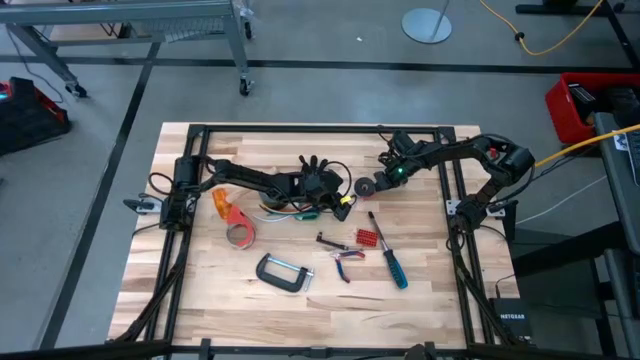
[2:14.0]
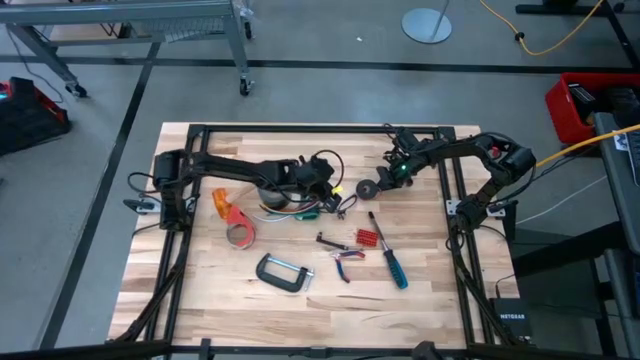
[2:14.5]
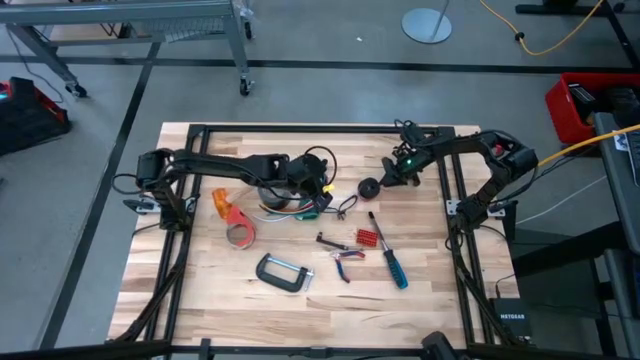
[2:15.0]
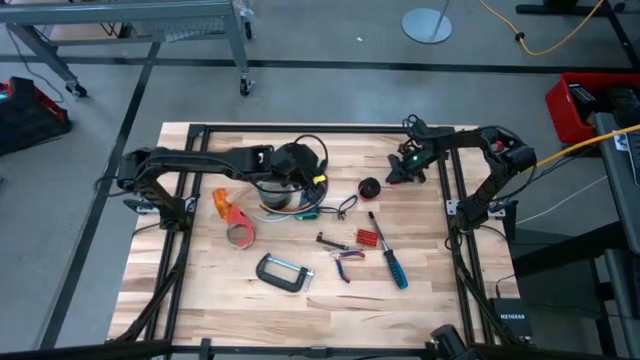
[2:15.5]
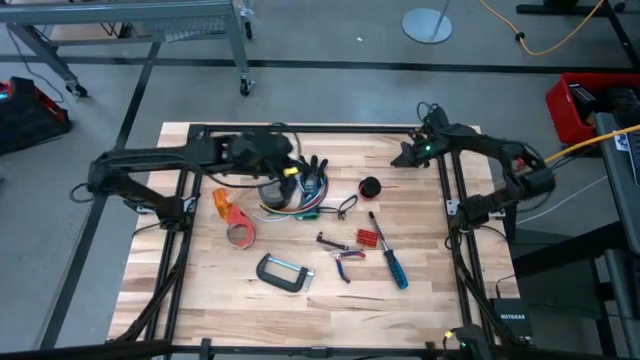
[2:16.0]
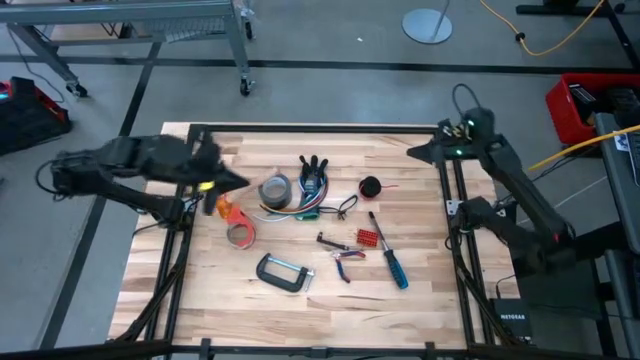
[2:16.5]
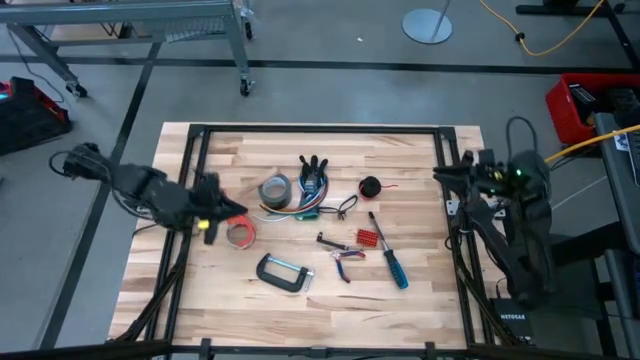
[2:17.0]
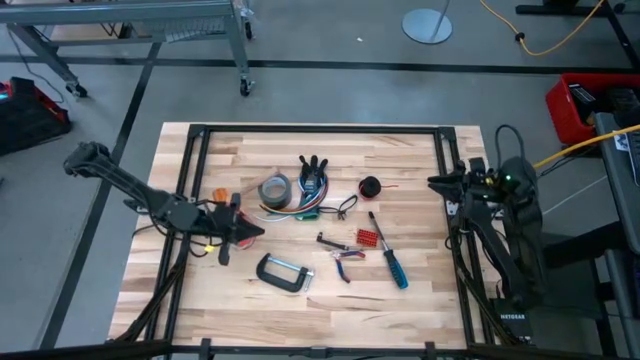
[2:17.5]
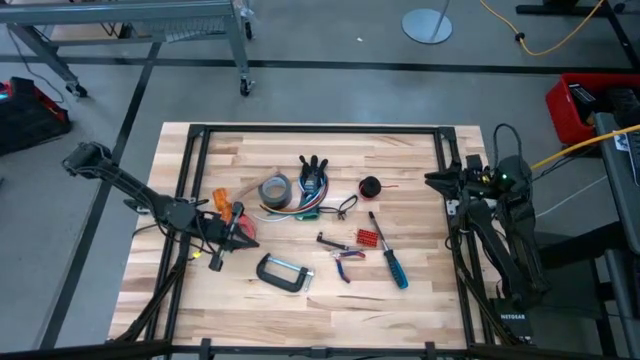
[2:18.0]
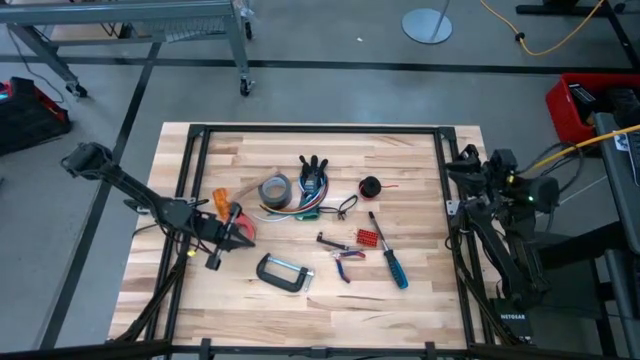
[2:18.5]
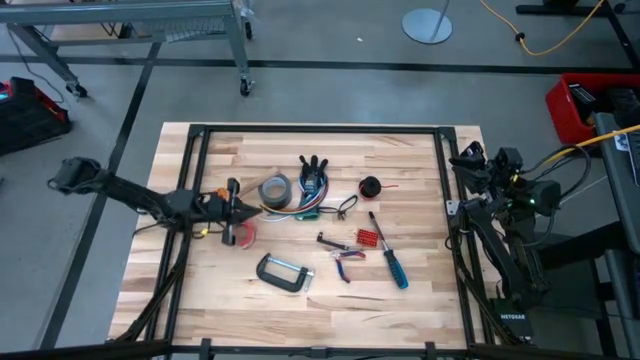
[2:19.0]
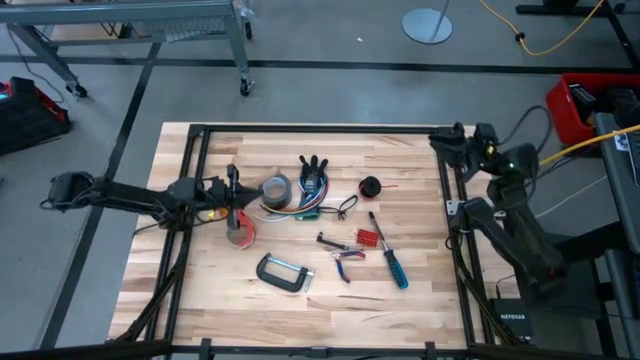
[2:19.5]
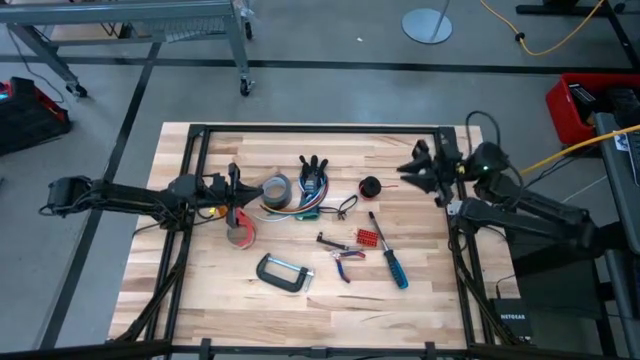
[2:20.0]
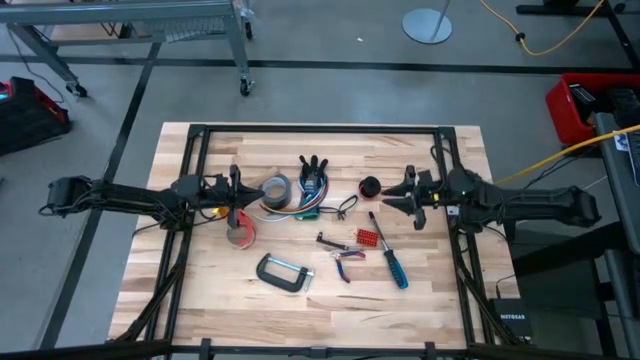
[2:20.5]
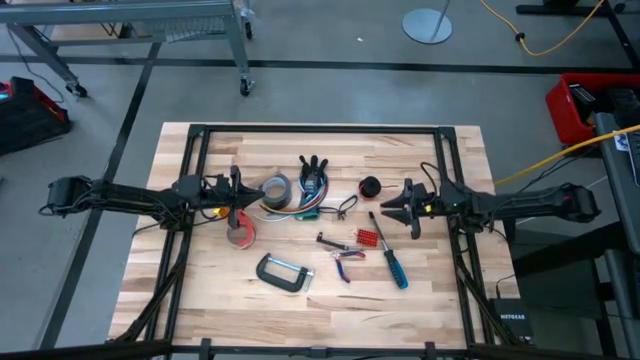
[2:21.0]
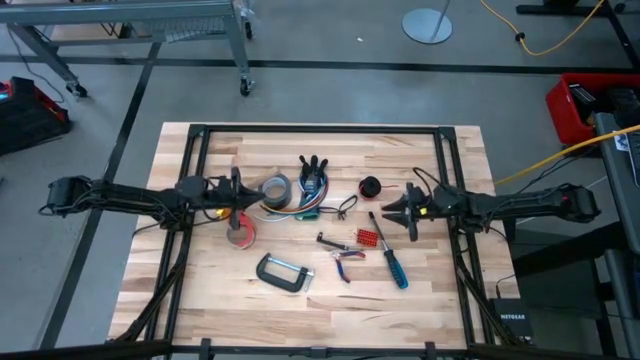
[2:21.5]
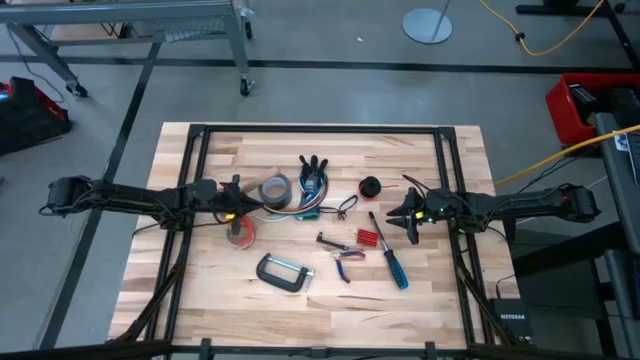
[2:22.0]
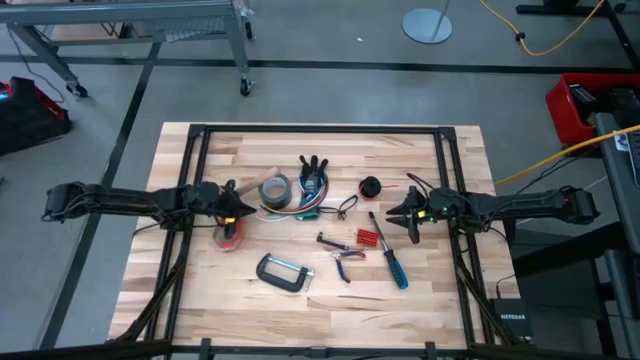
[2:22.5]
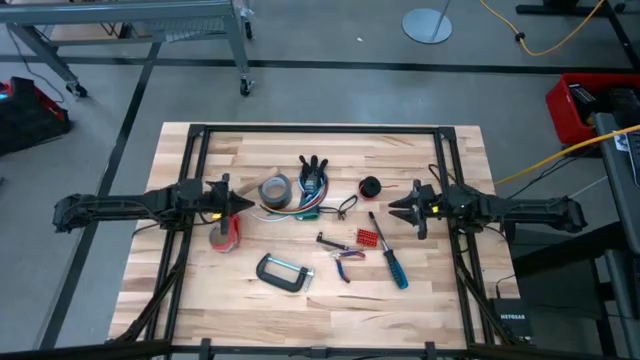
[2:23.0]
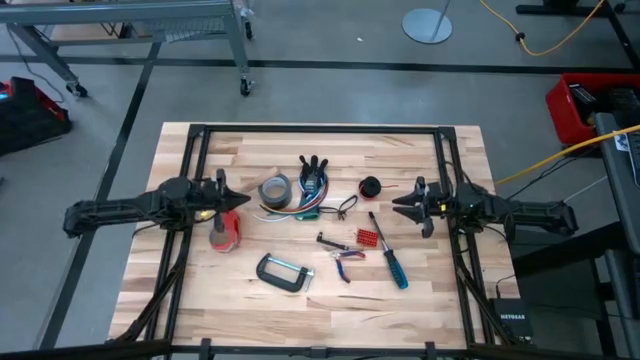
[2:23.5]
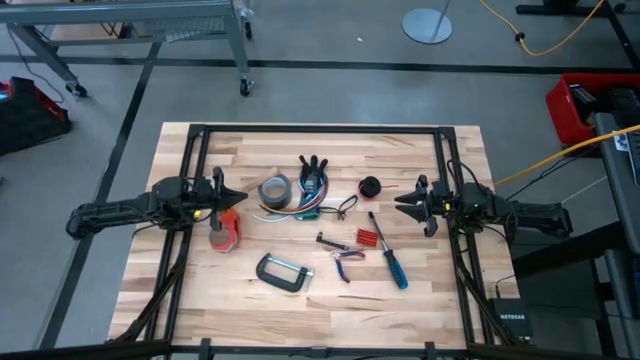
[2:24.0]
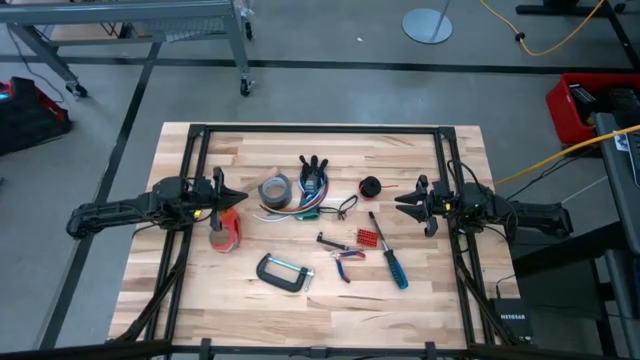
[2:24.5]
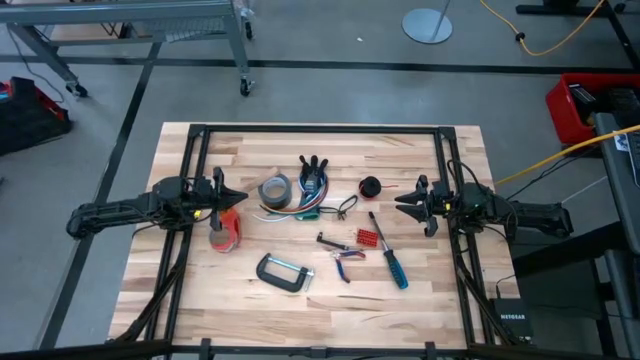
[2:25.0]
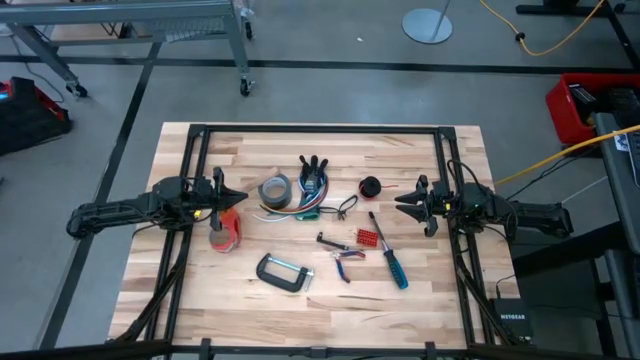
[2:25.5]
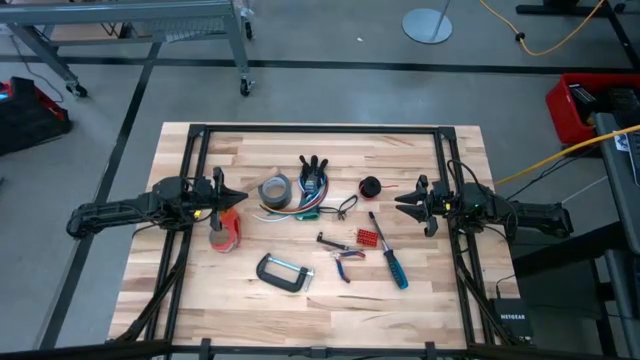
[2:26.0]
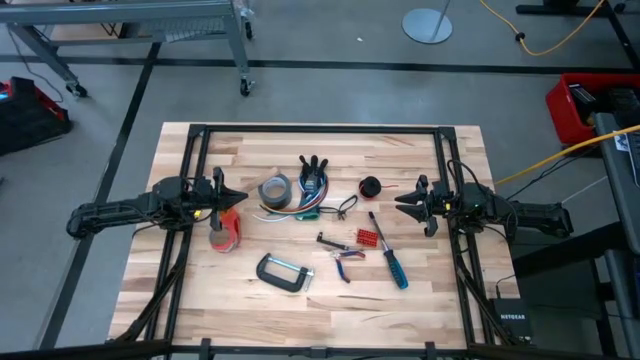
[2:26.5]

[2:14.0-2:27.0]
Task: Coil cords
Return to Home Position

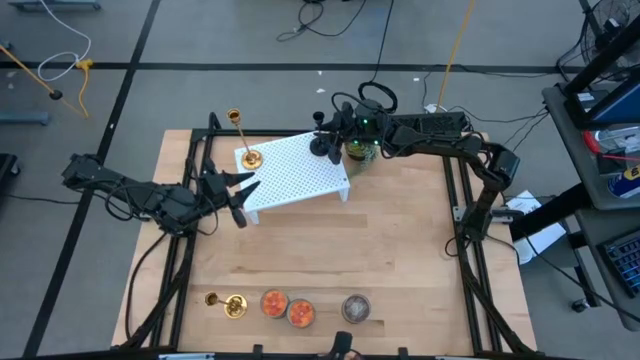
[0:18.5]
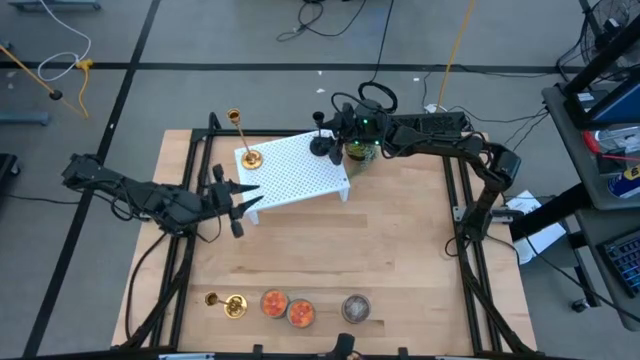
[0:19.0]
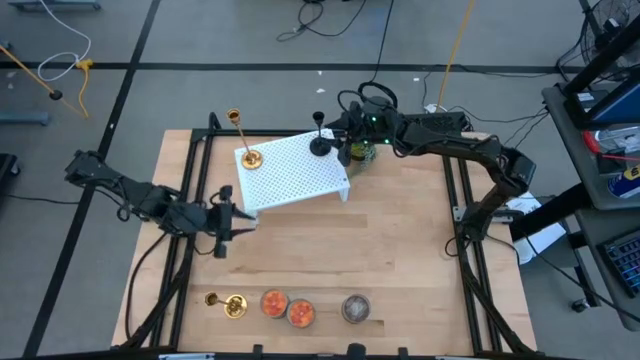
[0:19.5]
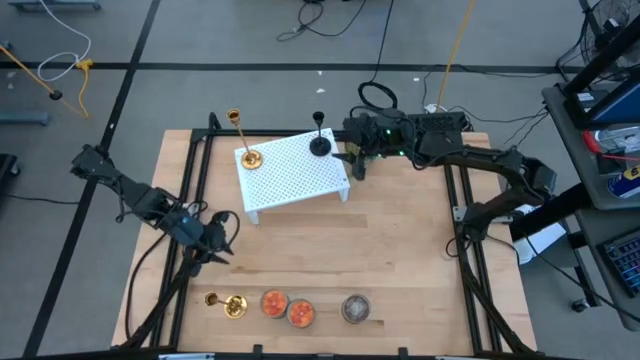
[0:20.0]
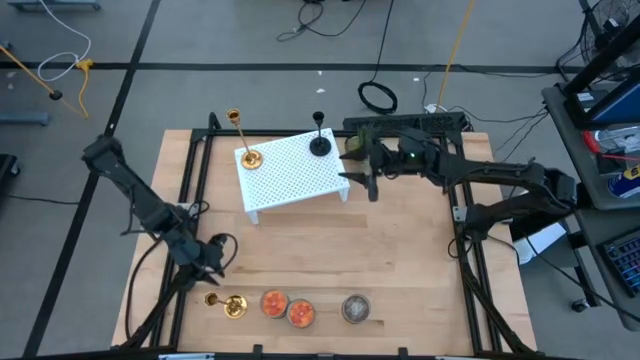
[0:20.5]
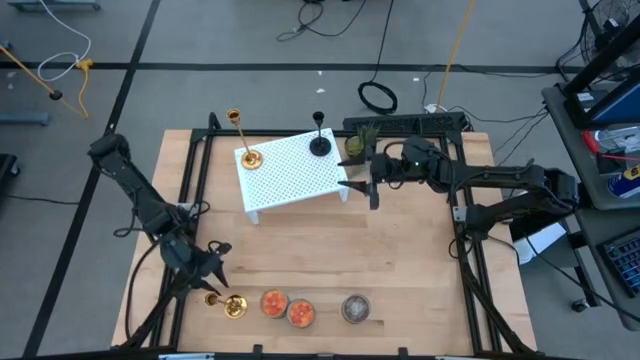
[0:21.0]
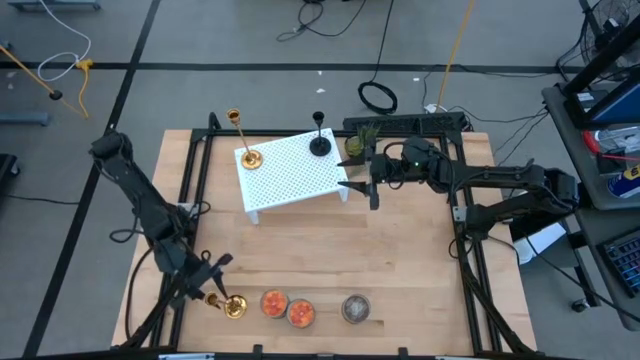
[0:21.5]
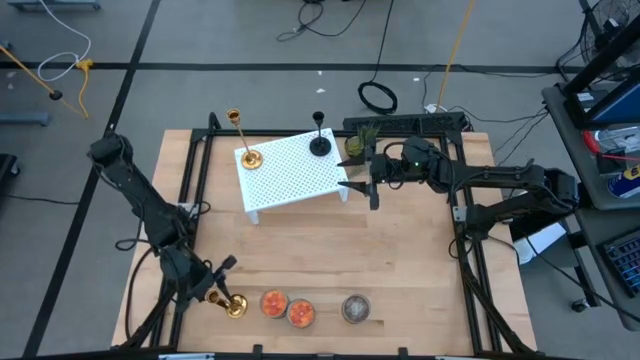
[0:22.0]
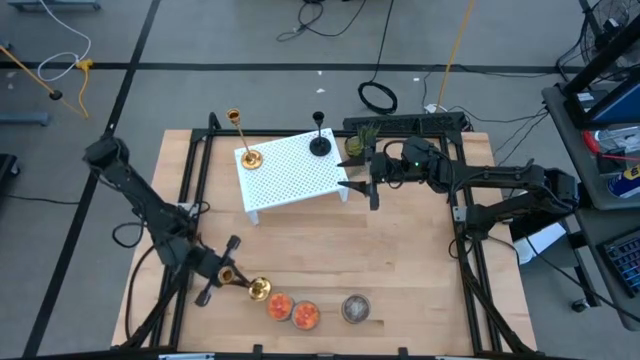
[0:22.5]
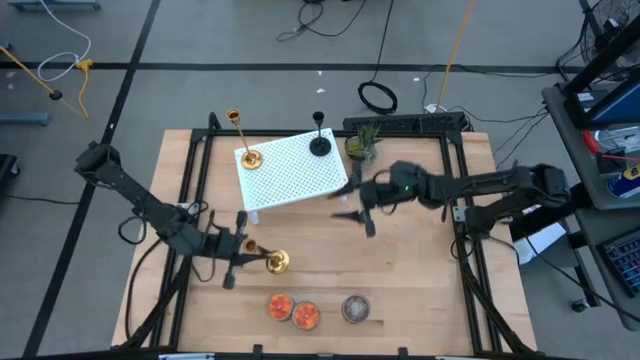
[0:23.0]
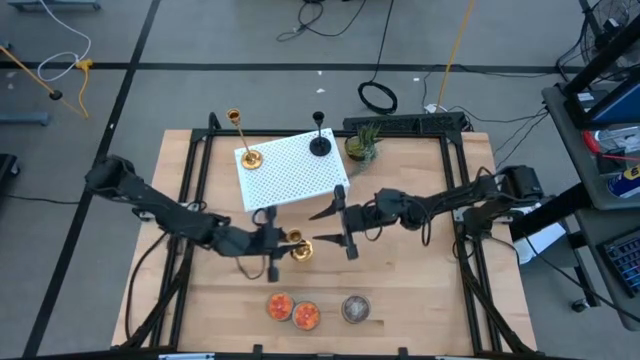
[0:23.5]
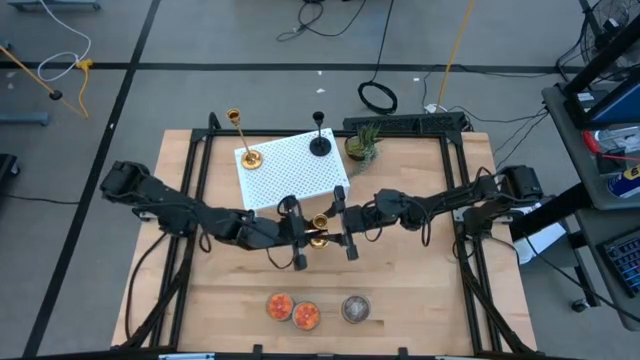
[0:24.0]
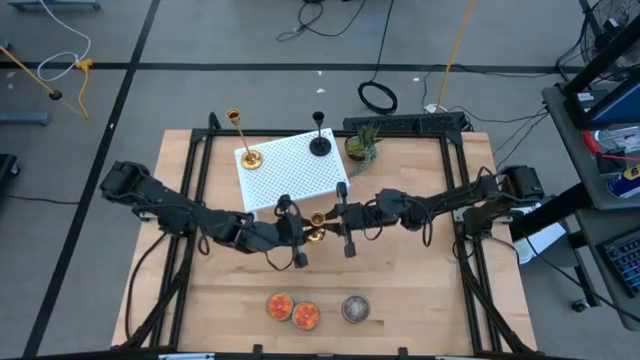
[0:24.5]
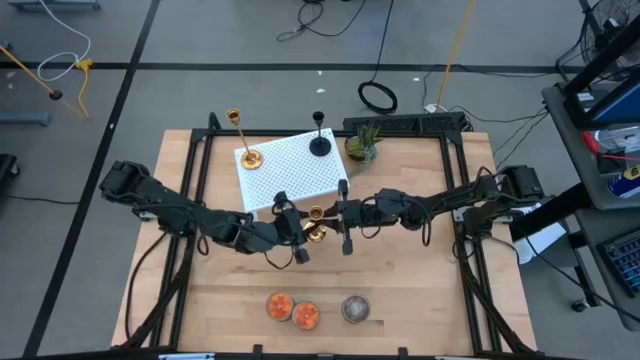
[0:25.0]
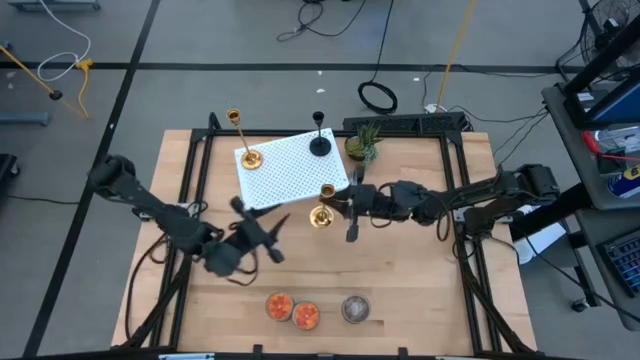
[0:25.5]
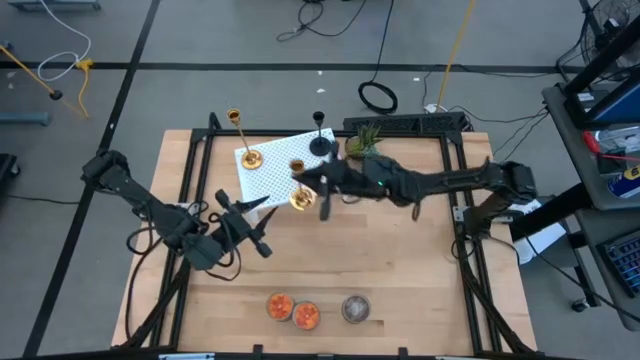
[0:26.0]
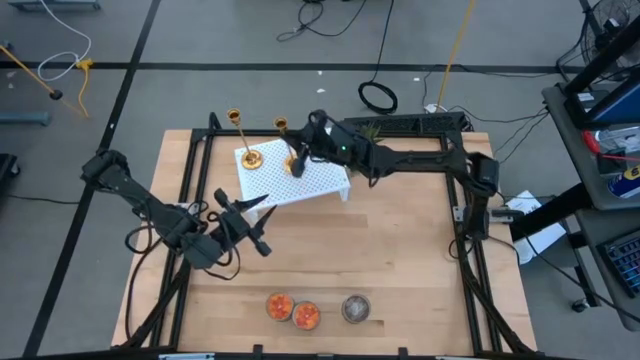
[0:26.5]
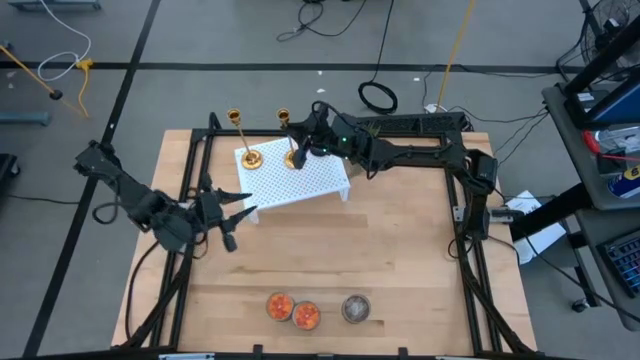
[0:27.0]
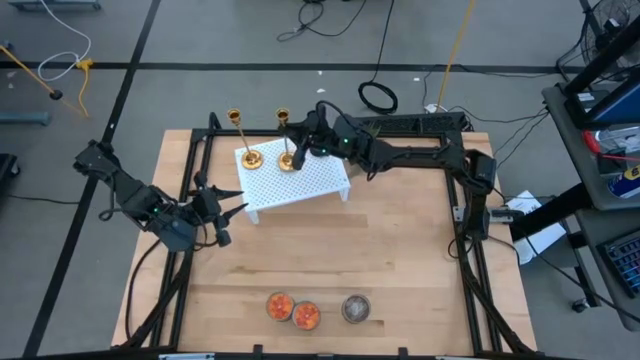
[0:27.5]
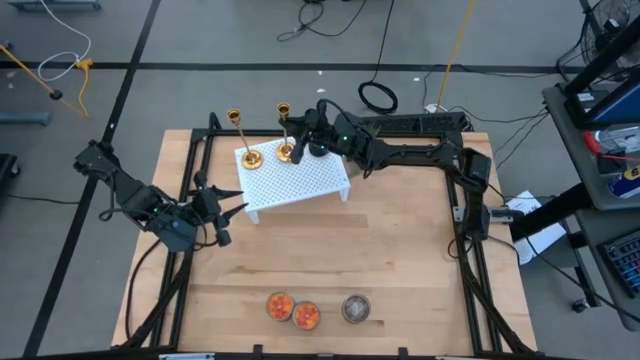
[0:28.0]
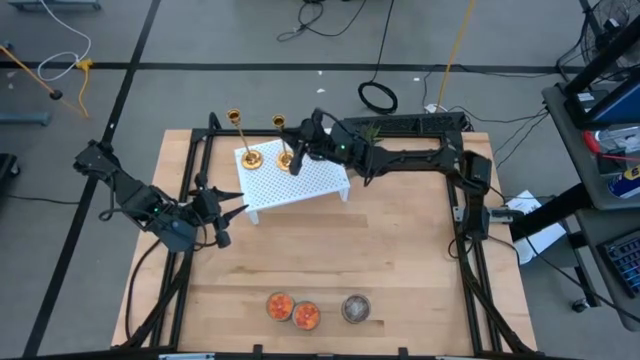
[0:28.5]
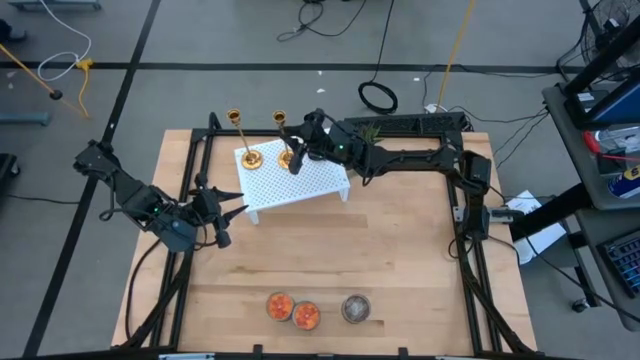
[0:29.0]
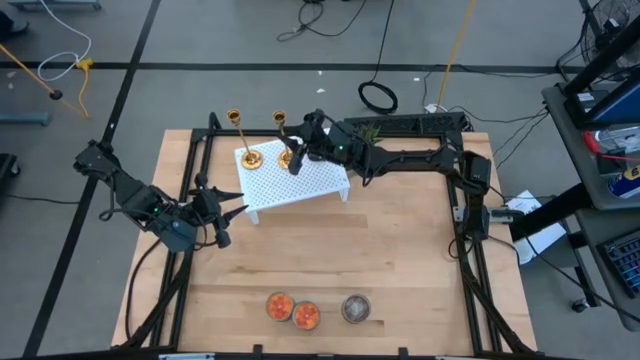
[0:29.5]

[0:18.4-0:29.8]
Task: Pick & Place candle stick holders
Put the gold candle holder on the shelf
